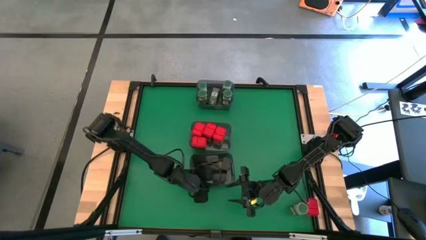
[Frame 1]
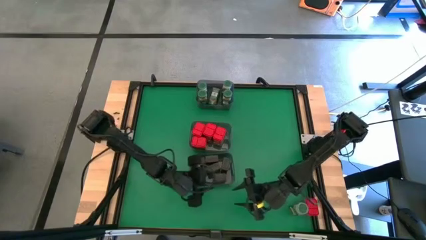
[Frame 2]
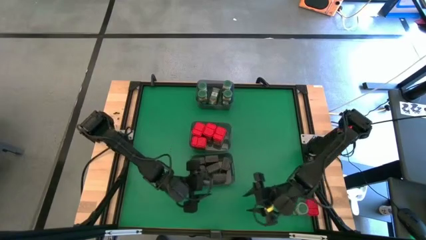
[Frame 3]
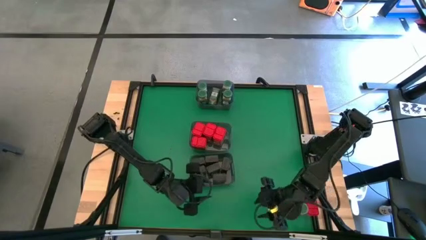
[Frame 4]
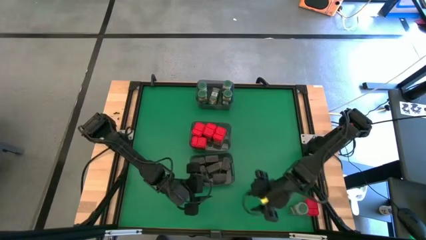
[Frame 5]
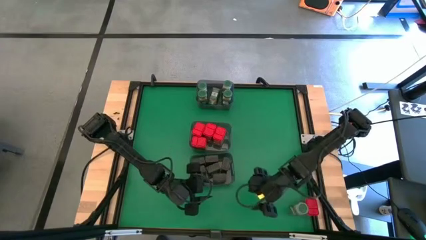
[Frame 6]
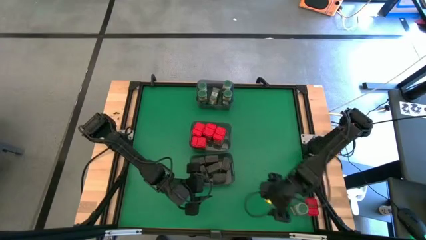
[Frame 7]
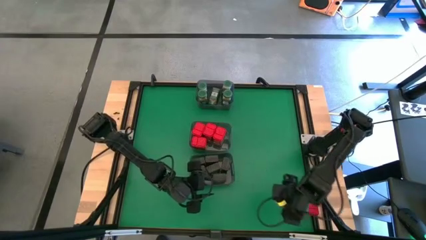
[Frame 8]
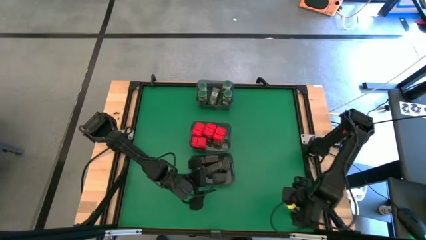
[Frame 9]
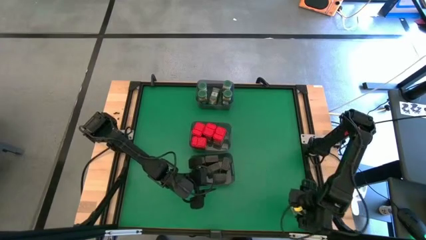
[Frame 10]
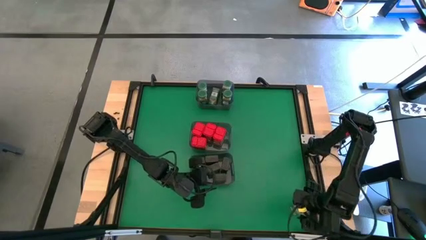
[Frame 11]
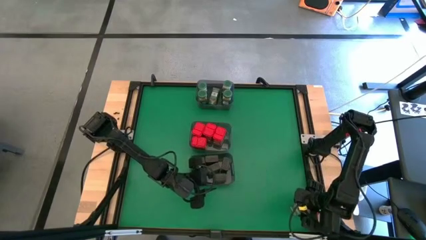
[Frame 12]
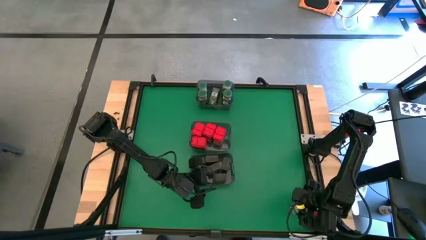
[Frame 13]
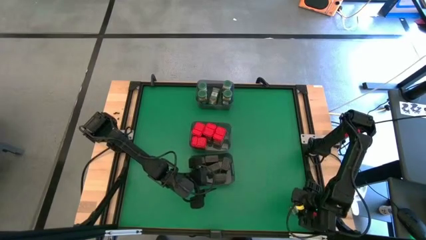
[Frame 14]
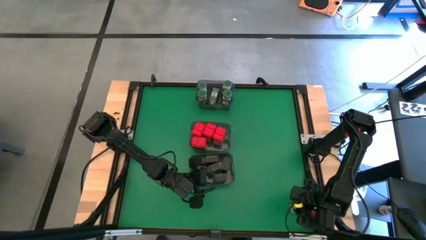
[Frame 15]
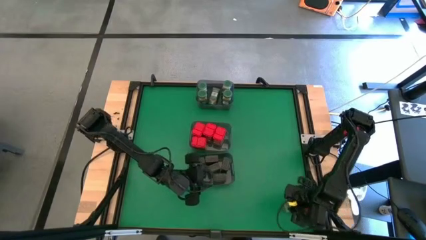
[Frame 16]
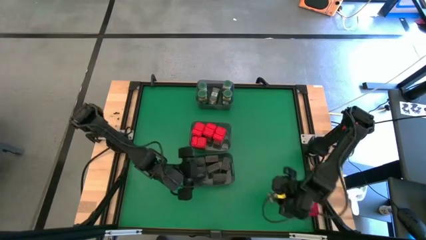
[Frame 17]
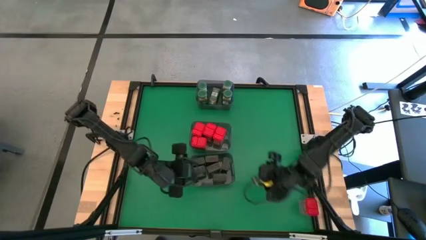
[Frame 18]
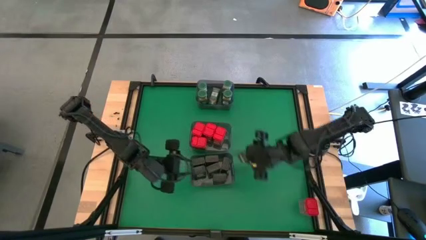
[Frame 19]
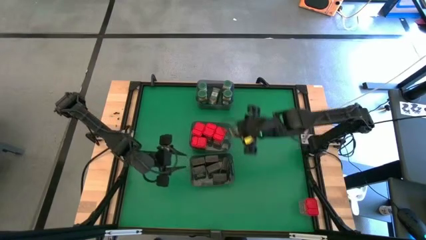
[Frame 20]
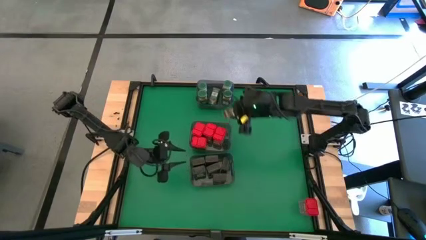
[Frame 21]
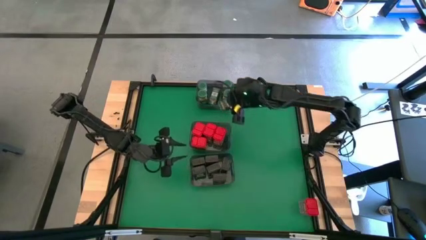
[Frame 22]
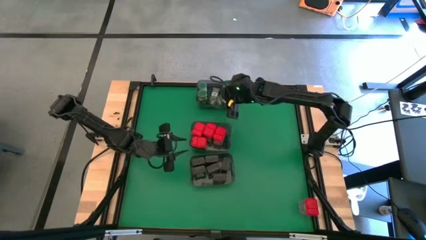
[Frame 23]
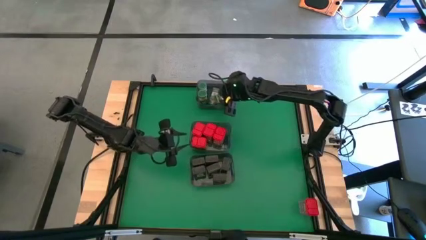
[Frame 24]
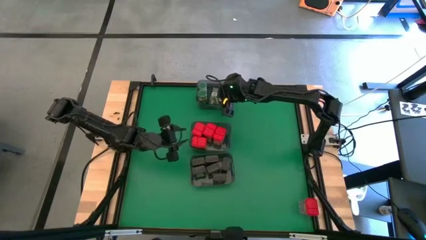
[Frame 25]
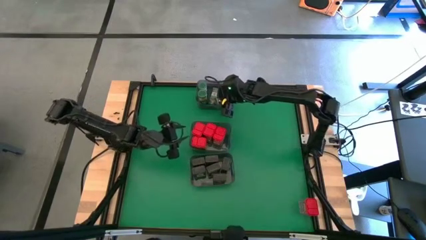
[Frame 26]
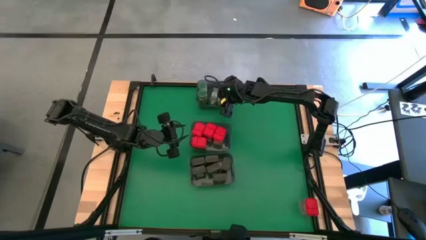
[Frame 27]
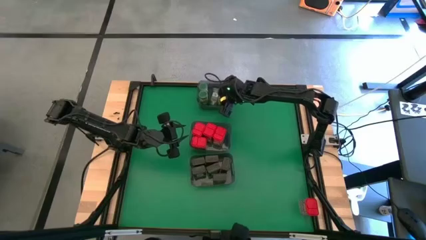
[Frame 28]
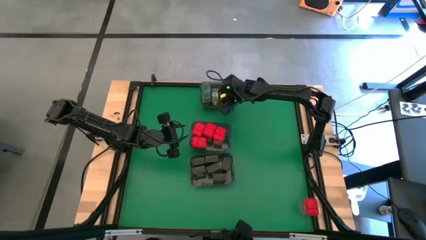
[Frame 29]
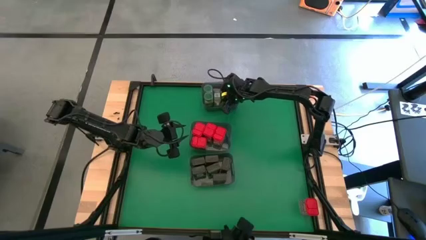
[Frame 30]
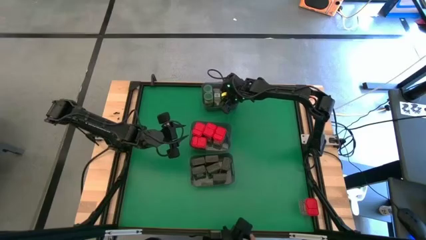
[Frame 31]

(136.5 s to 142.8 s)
Task: Sort spices by type
Put the green seasoning bottle into the top gray bin

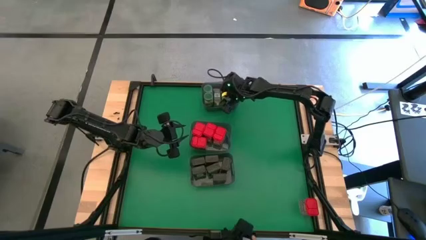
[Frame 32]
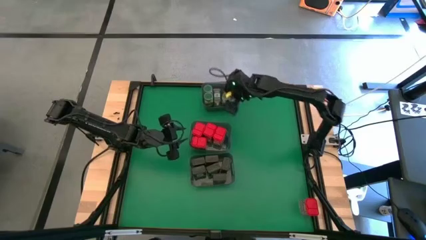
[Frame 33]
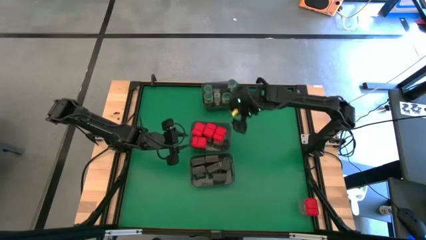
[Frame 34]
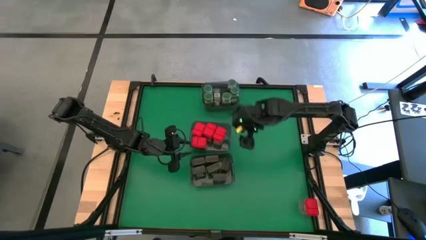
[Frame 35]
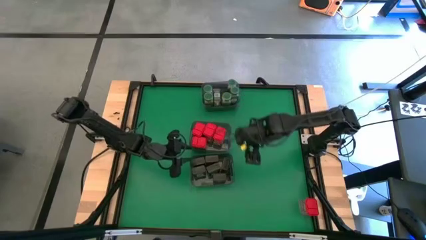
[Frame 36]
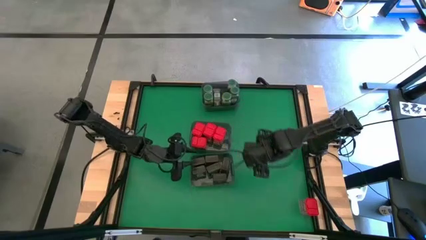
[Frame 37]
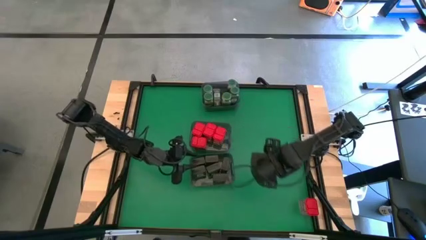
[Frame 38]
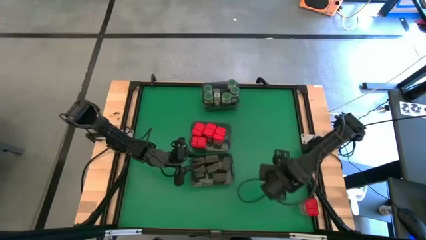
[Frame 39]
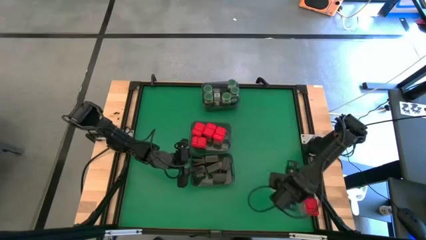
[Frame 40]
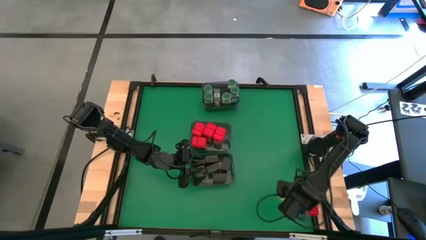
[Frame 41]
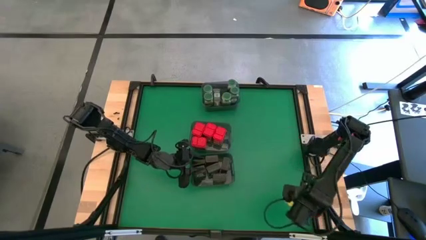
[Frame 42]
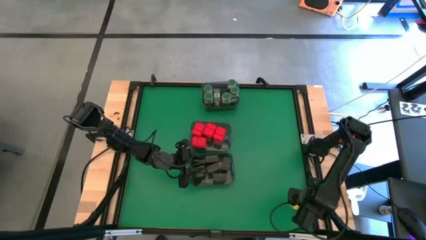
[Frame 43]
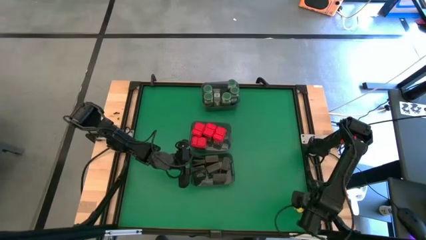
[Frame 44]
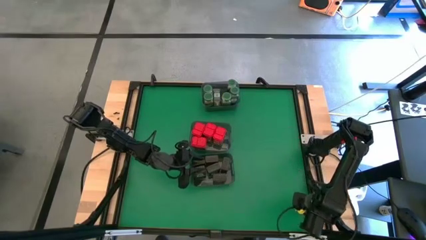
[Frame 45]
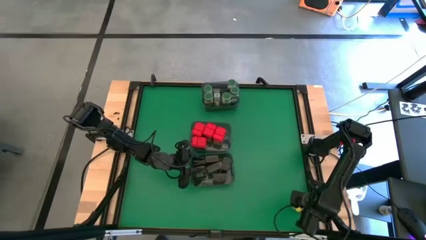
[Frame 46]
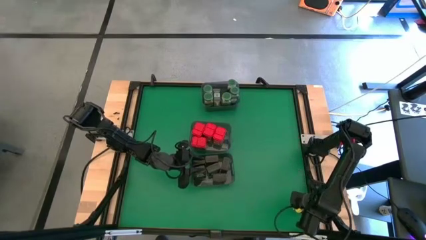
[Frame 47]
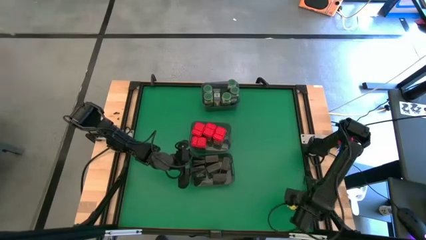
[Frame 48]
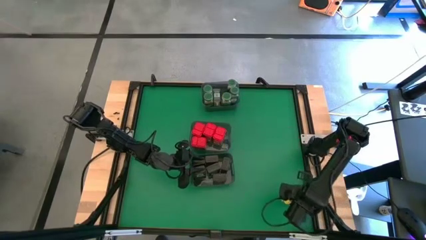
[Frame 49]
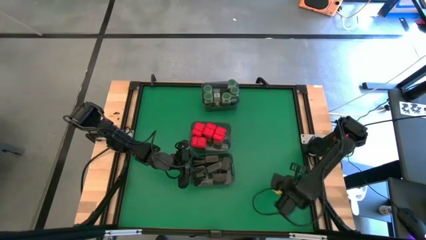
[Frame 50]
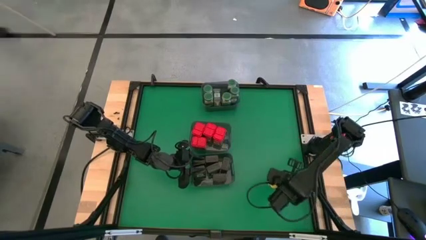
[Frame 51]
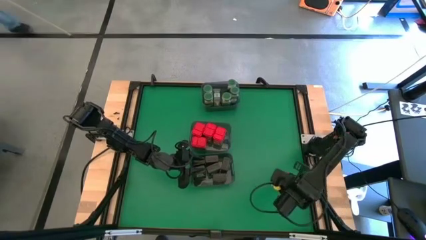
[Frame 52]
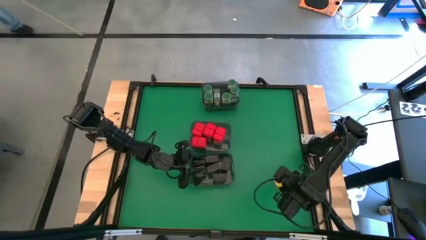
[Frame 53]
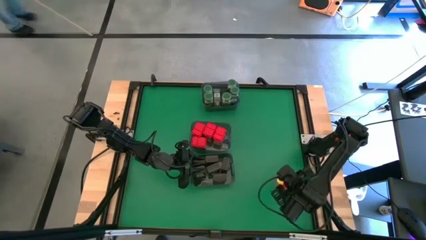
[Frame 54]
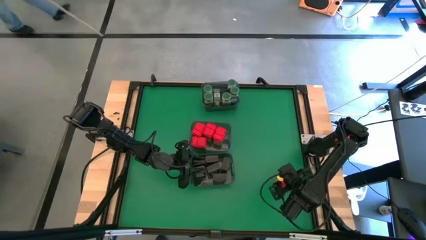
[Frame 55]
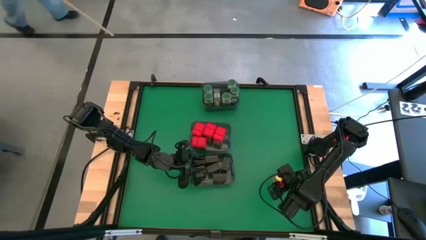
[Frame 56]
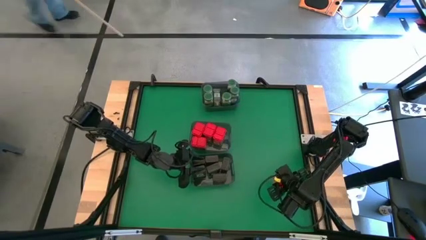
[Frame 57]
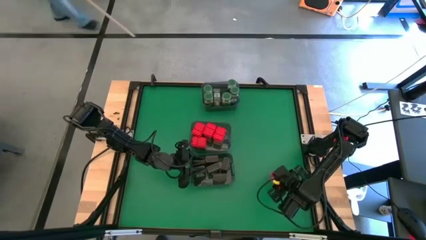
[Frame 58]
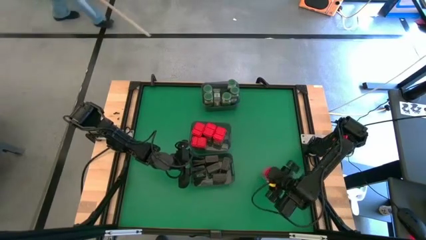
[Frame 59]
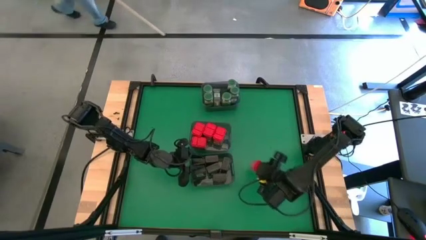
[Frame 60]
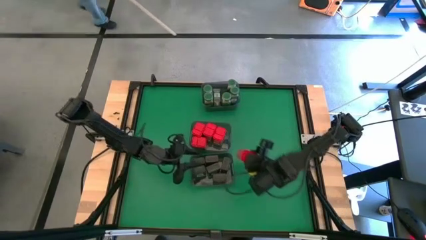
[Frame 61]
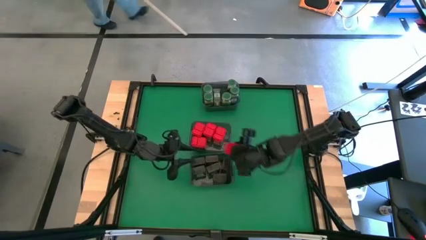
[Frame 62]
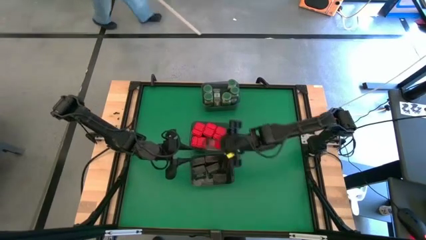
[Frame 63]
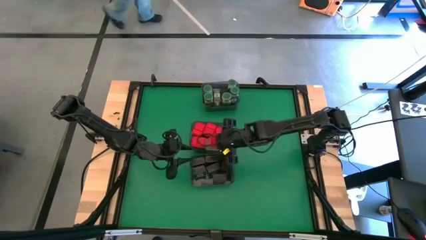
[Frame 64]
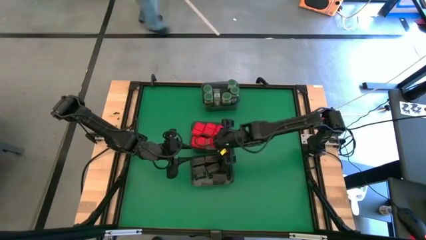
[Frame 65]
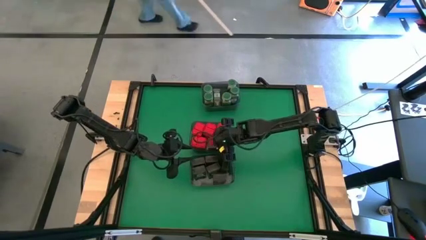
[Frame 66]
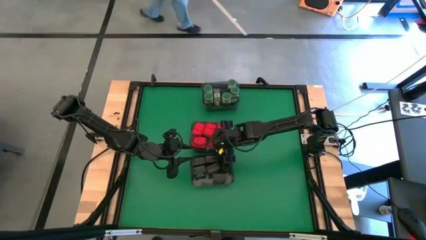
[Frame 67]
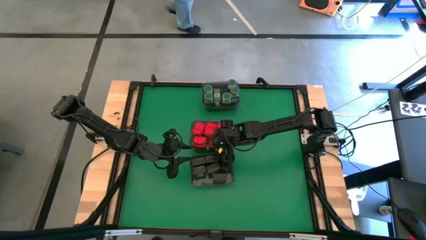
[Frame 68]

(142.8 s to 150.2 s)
Put the red seasoning can into the middle gray bin

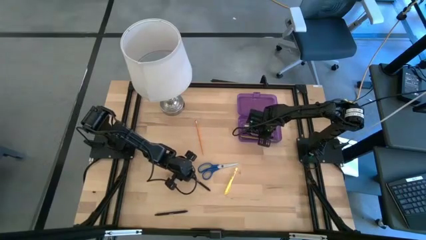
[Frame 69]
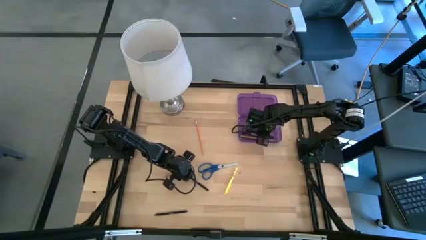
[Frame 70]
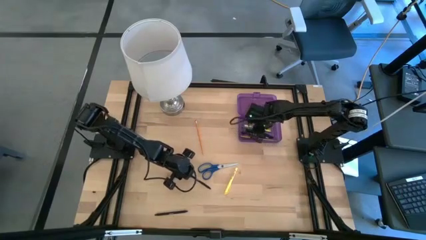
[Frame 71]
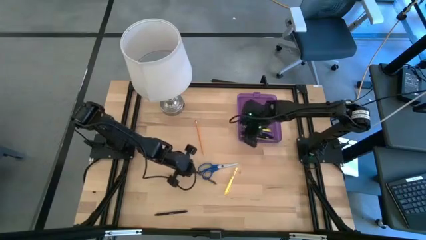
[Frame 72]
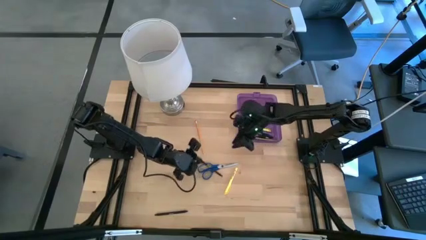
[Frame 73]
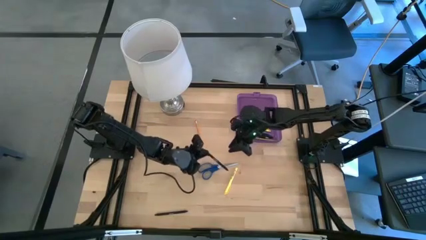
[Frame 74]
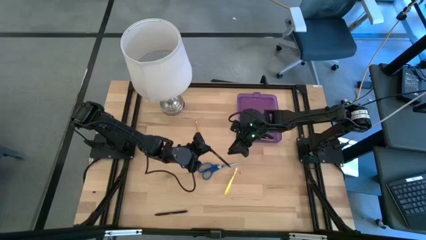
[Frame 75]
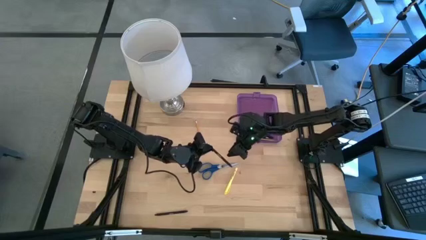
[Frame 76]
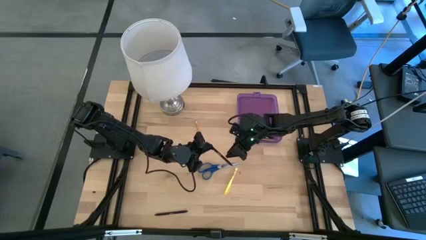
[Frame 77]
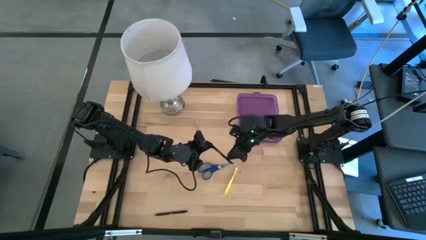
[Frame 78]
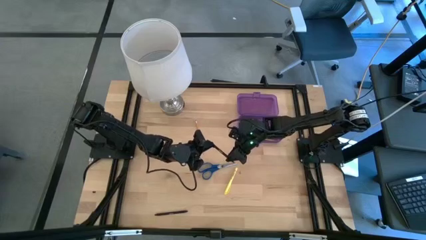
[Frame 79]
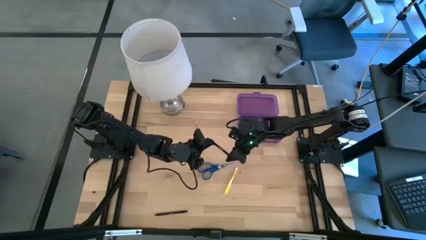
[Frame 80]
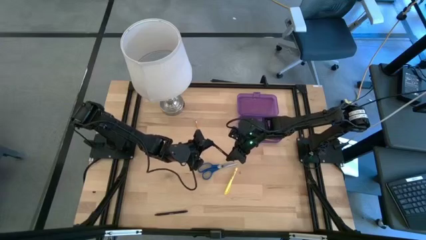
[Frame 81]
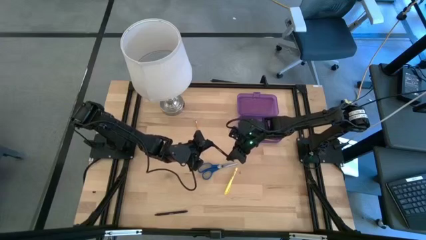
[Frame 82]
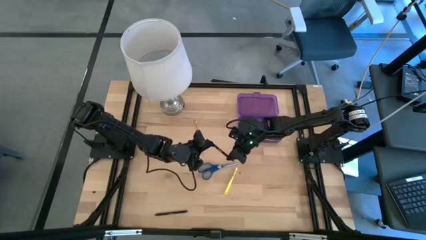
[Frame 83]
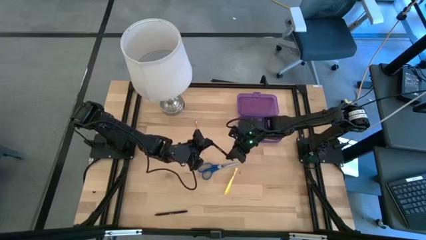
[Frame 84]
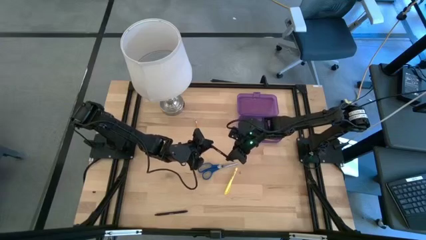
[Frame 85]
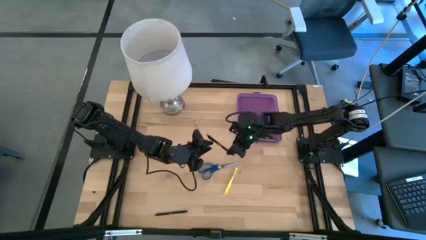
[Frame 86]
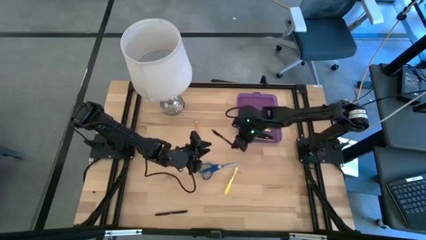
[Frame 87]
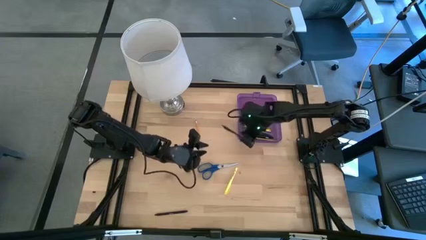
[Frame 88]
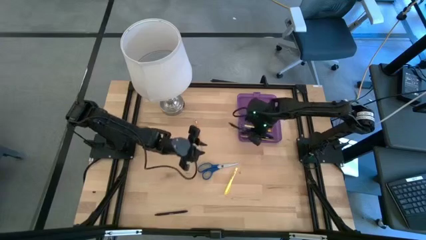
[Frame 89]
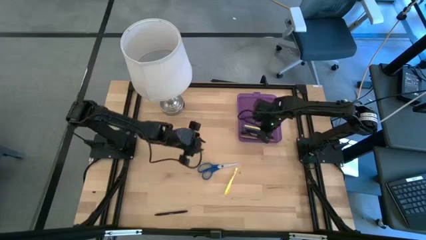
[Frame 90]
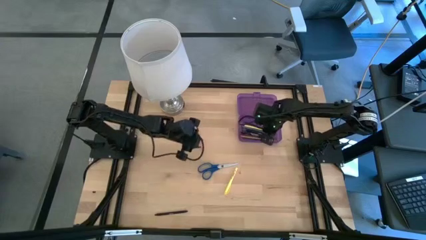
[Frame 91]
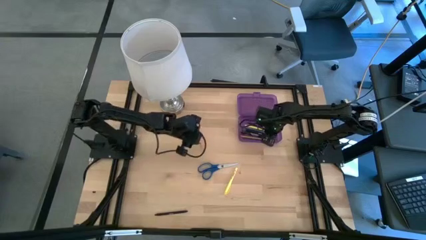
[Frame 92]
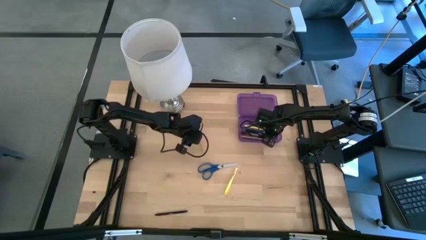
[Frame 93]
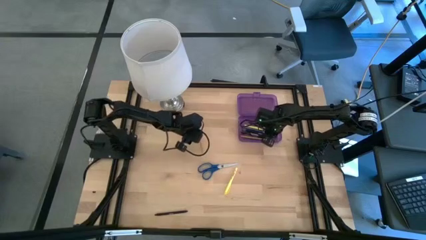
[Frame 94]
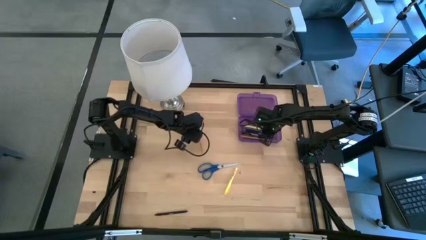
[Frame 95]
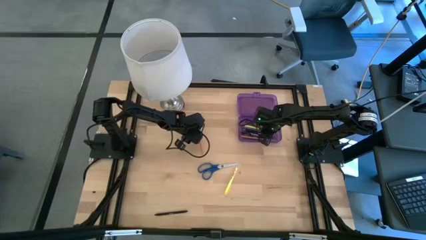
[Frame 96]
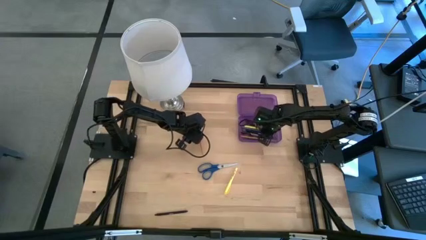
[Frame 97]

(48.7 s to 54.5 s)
Task: Pick & place school supplies into a supply box
Put the top black pen into the purple supply box
